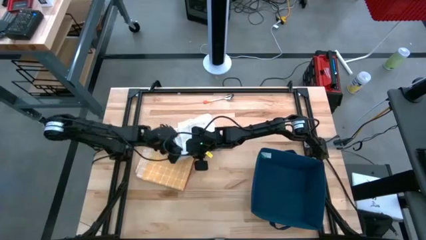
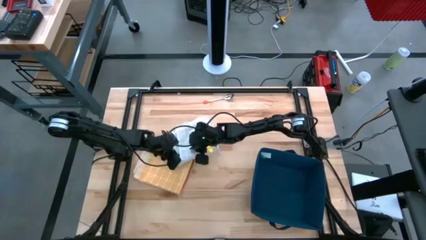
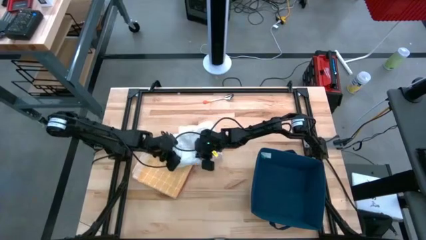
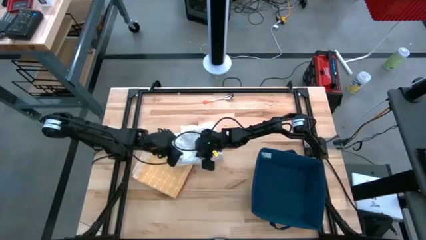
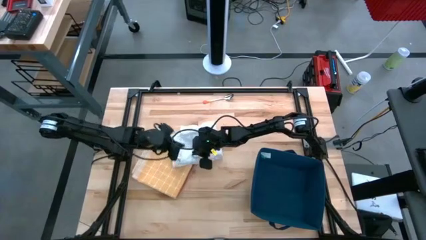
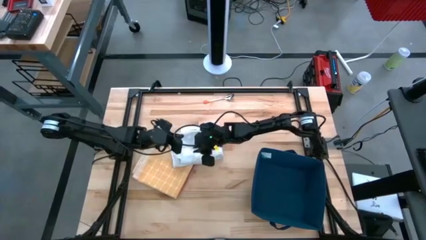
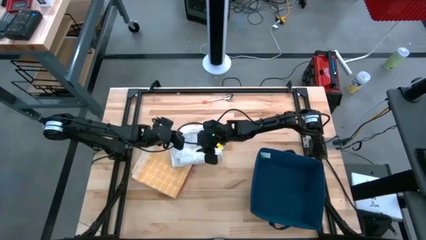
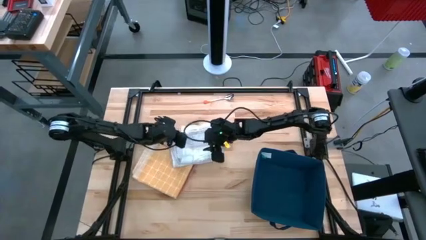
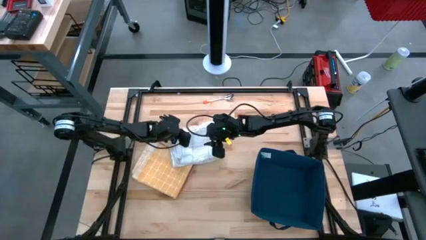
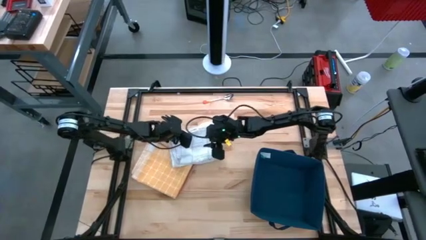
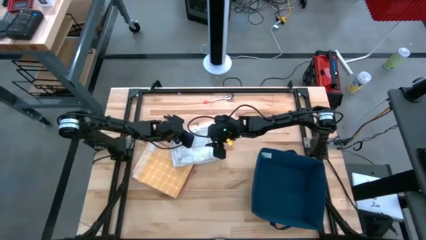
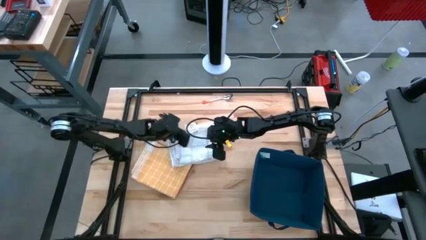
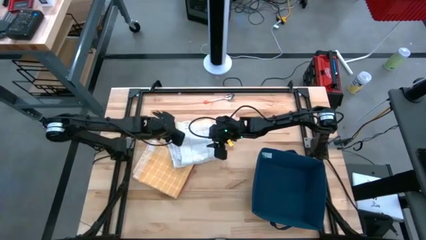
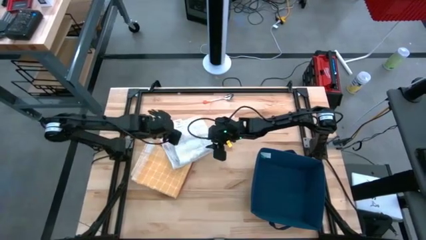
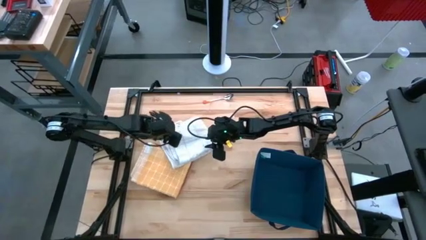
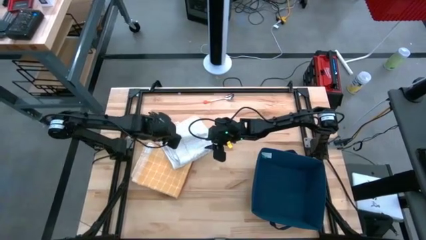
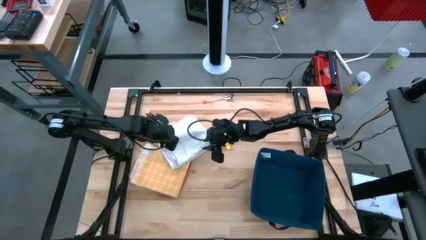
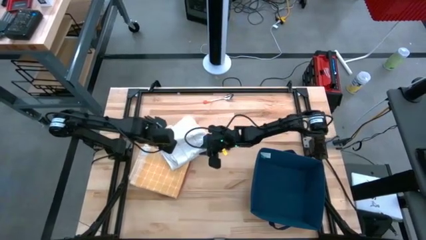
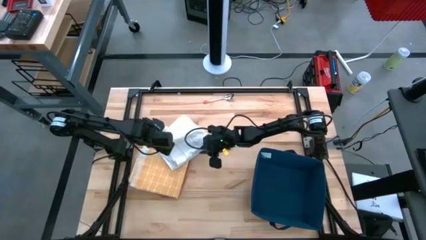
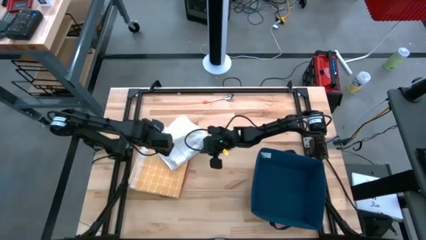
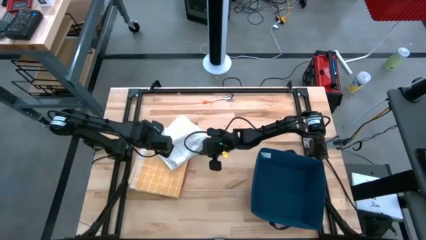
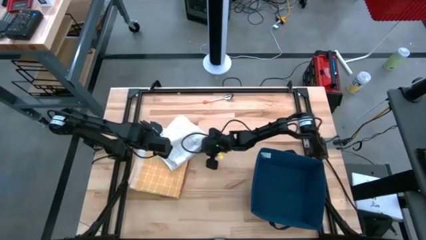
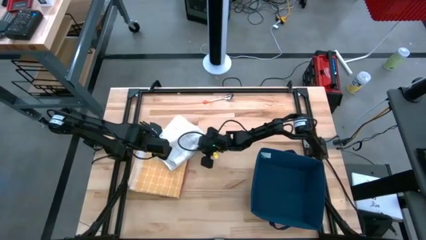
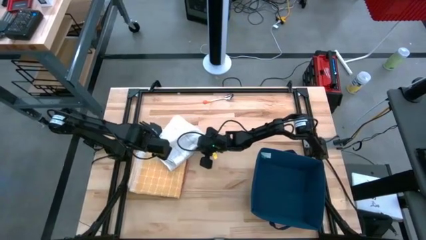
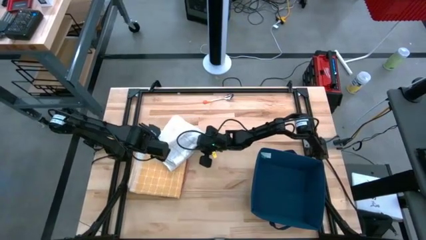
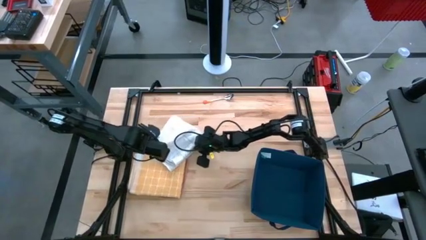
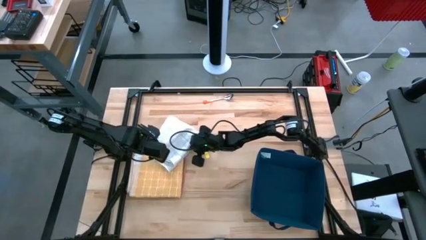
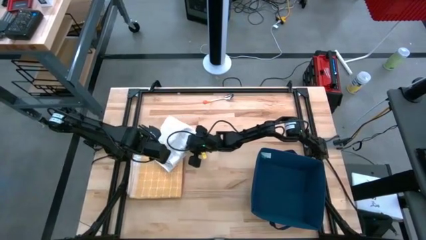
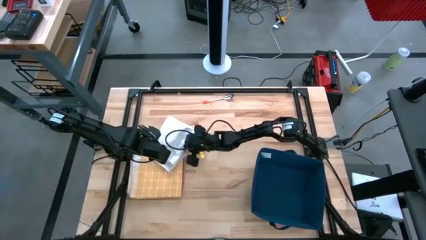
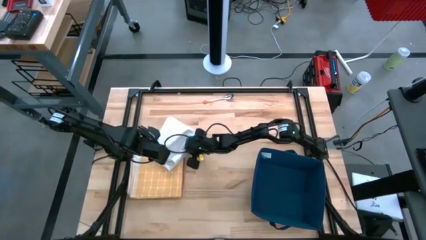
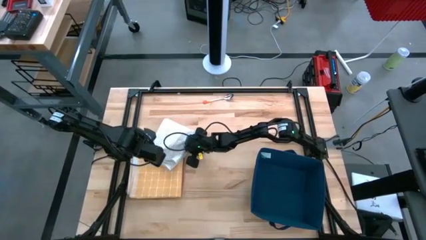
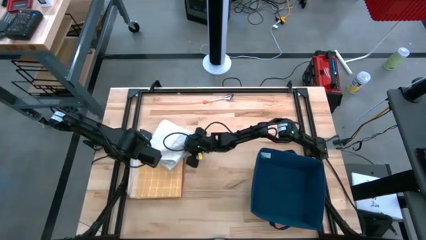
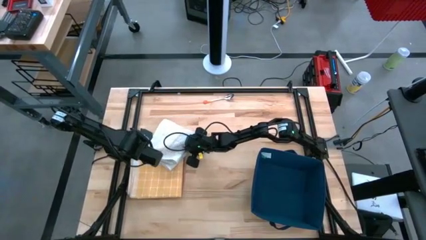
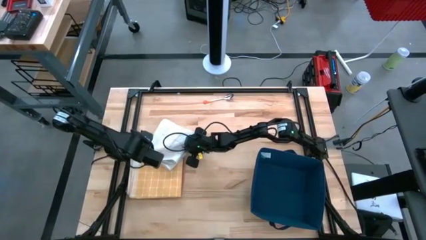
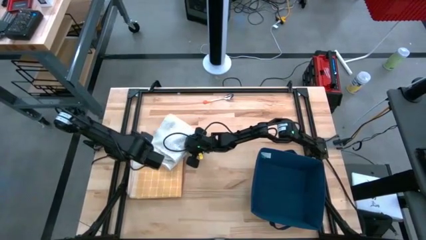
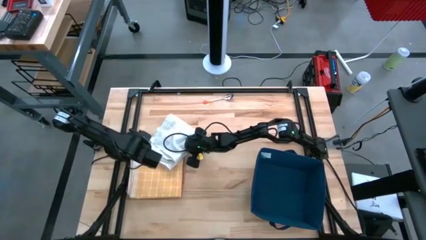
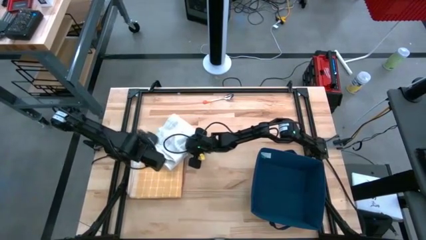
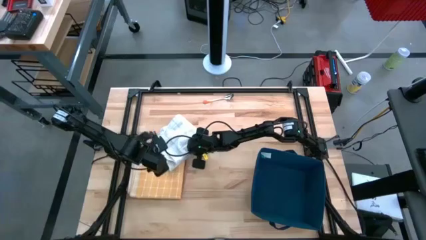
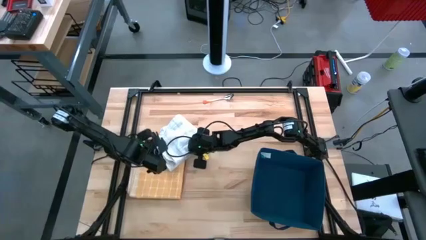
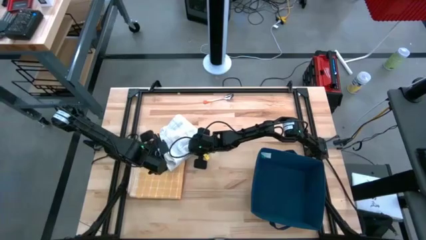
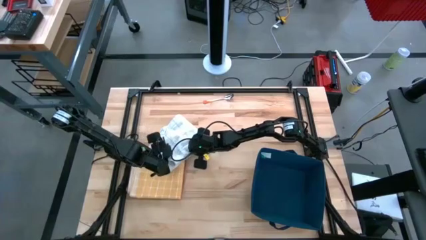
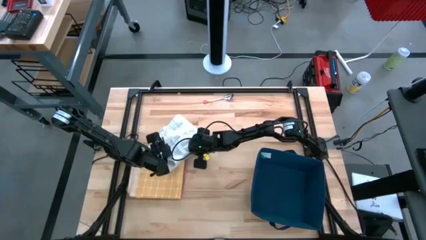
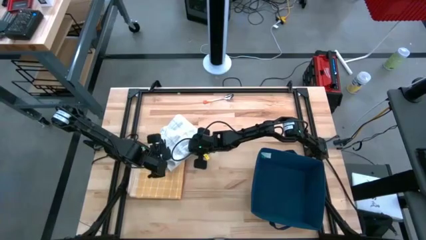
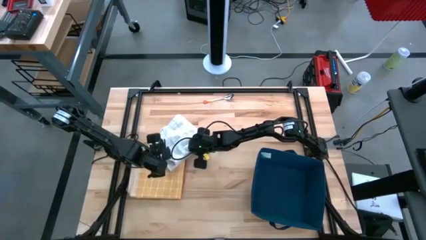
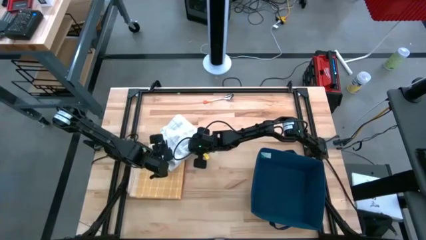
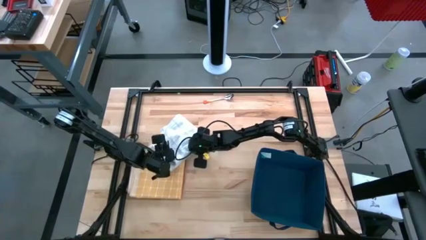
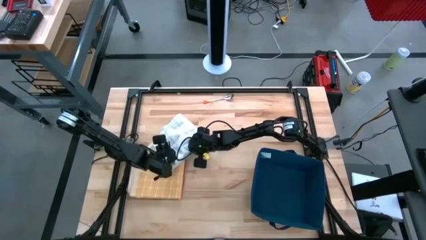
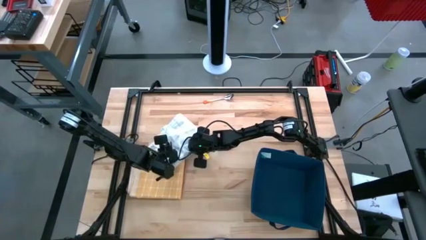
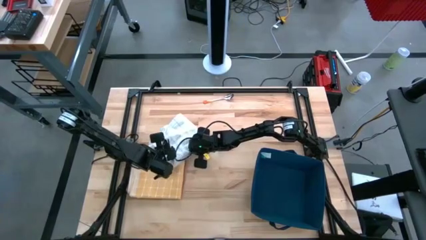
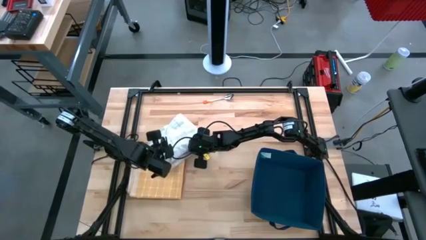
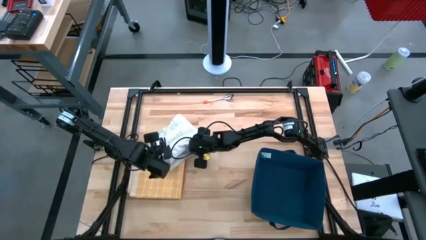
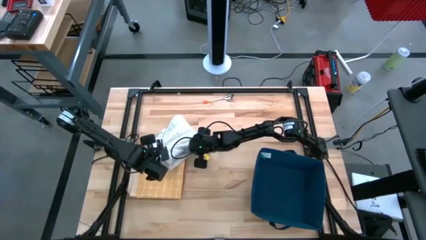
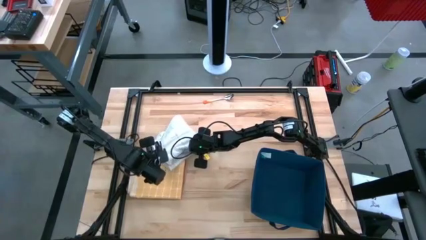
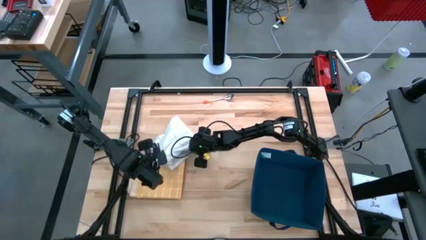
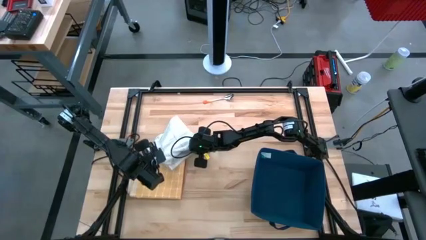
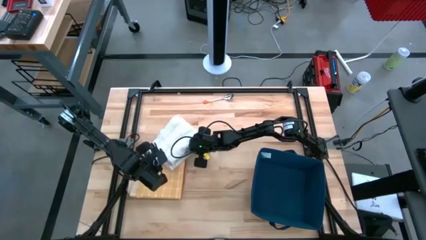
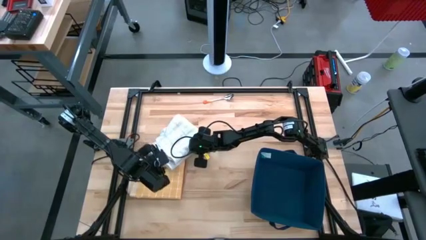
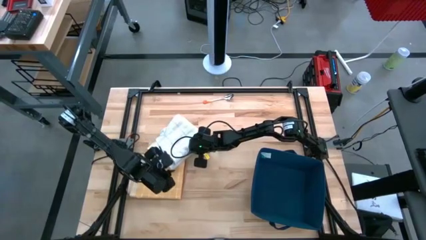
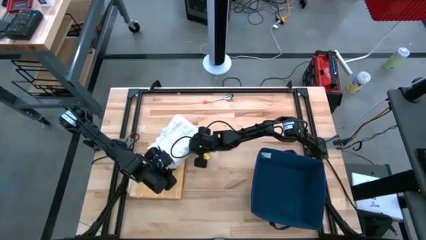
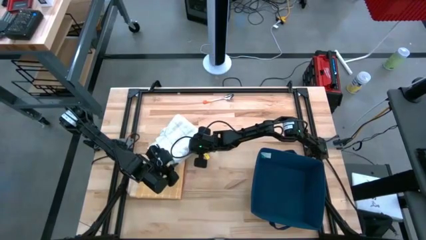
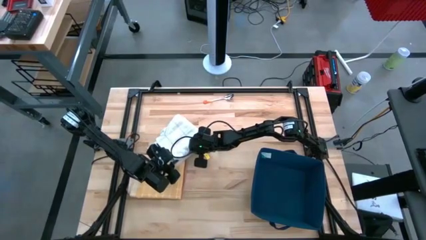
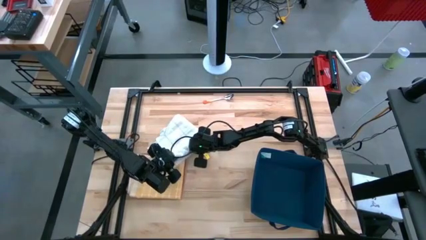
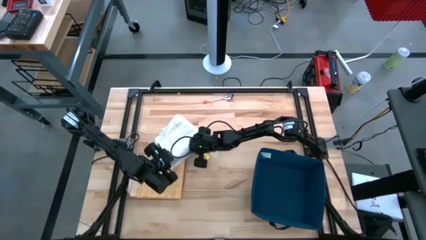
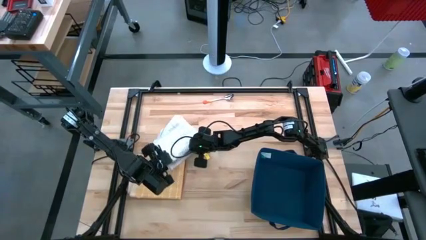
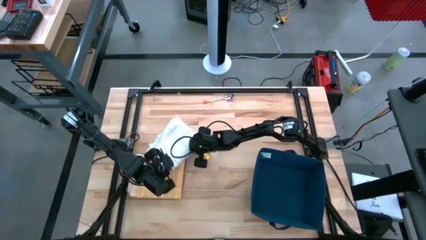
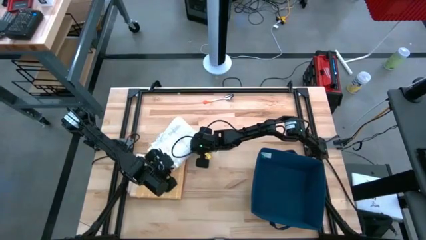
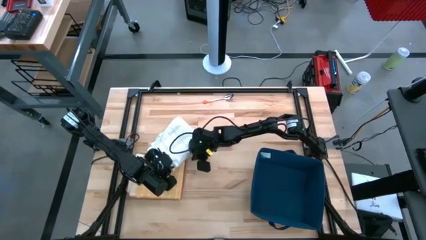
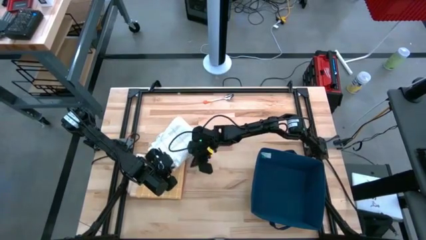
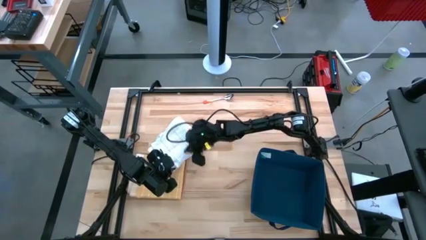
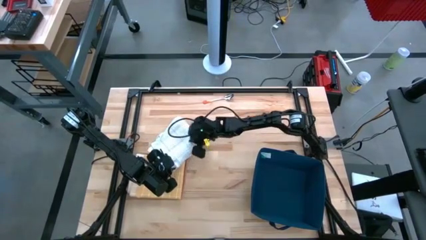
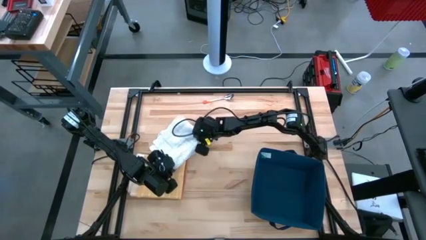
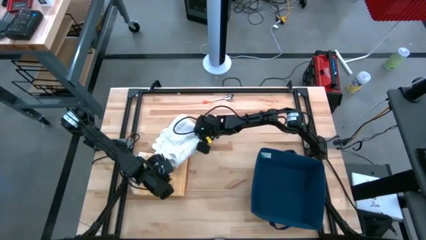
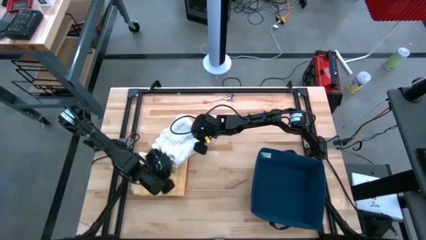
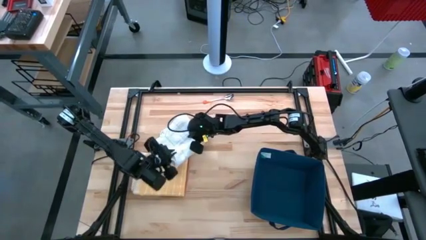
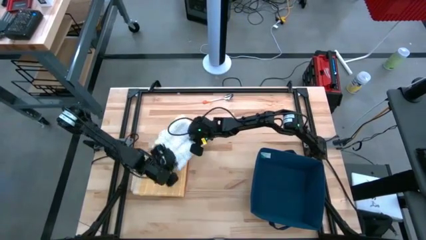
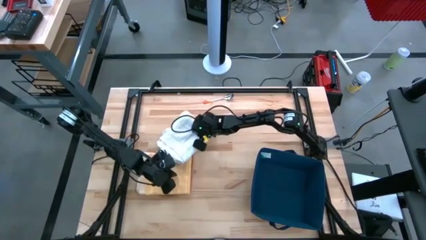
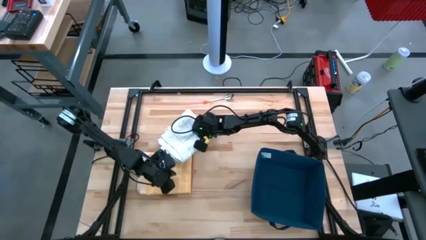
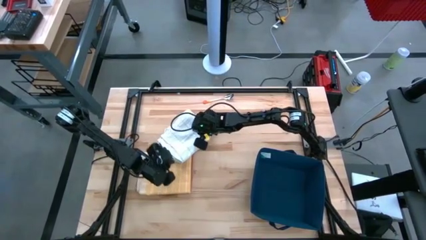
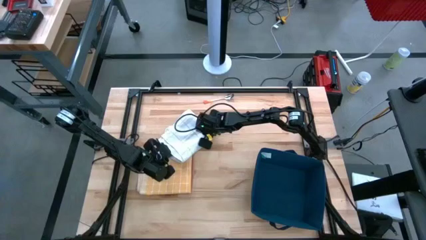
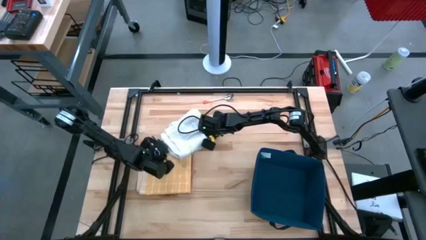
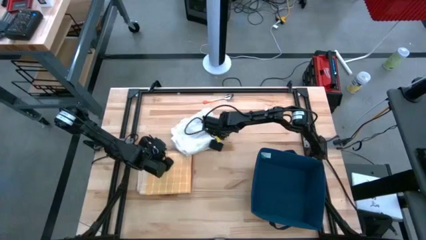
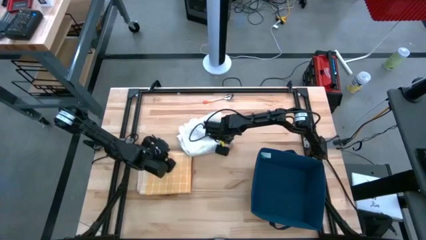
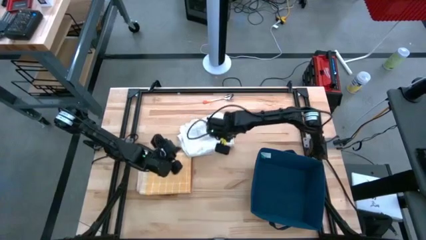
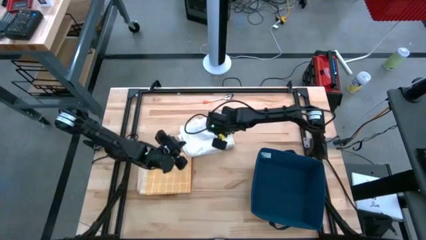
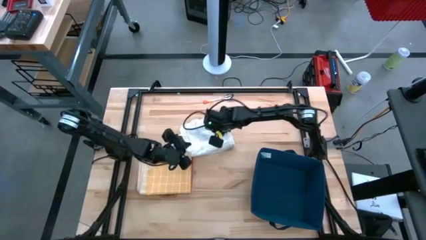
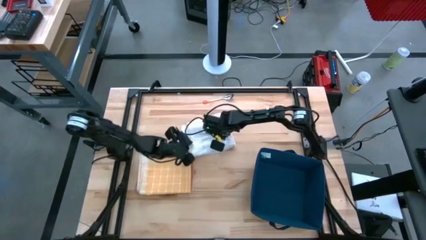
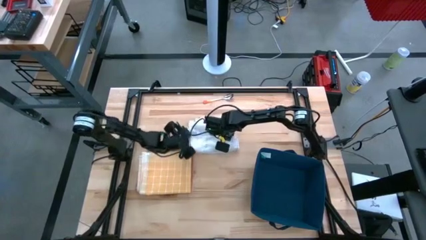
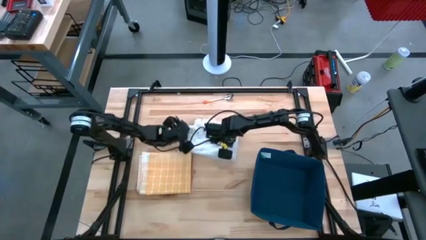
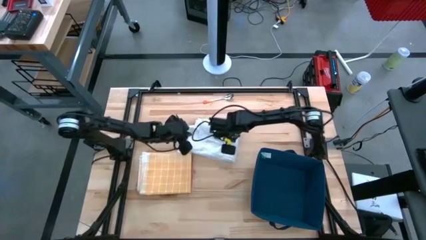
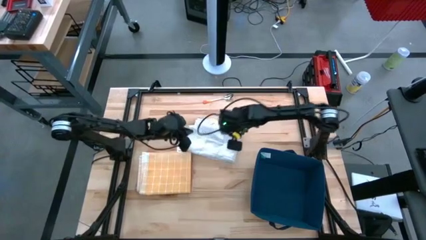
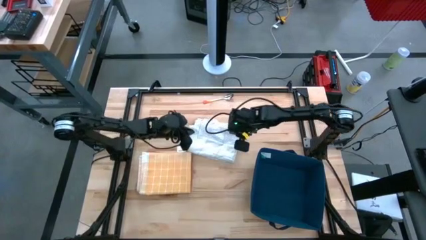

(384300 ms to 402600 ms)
Task: Fold towel
Fold the white towel
